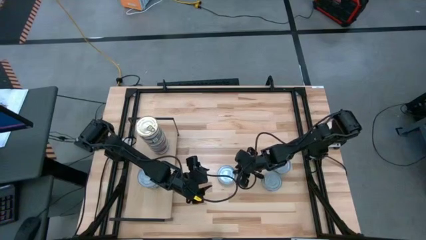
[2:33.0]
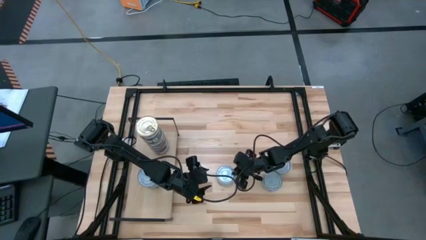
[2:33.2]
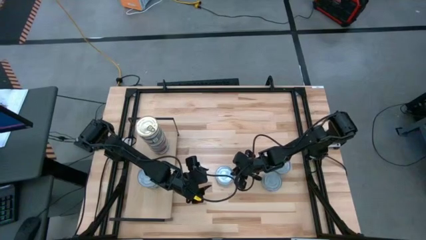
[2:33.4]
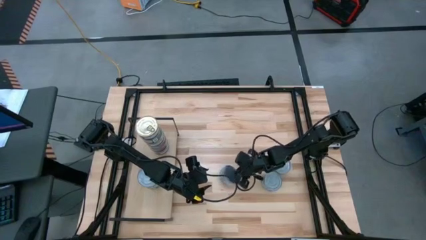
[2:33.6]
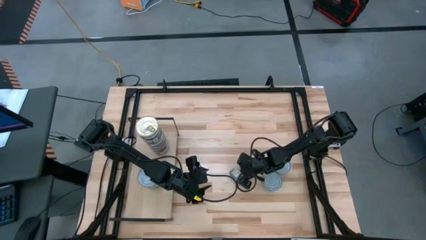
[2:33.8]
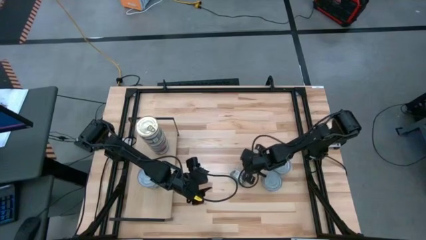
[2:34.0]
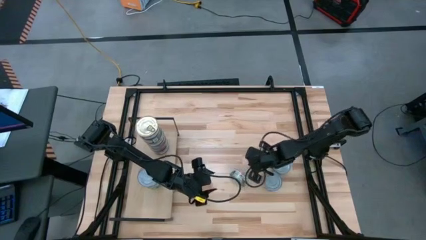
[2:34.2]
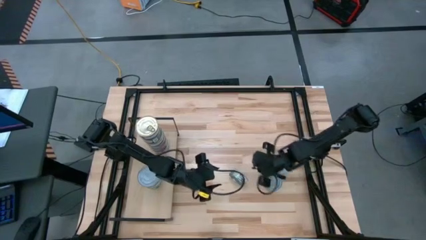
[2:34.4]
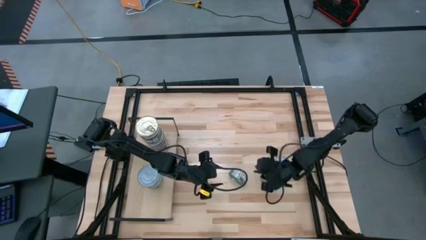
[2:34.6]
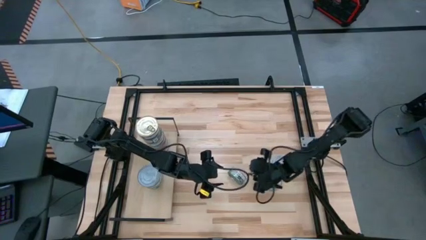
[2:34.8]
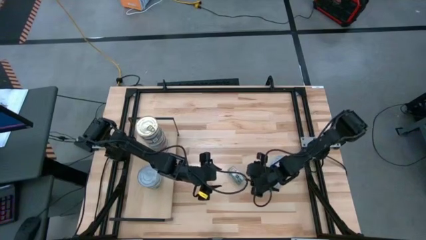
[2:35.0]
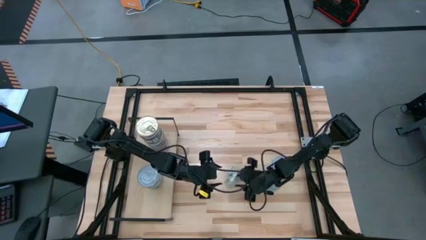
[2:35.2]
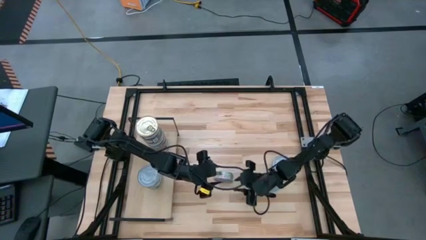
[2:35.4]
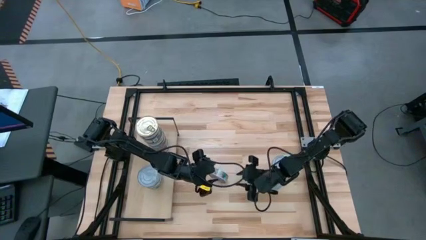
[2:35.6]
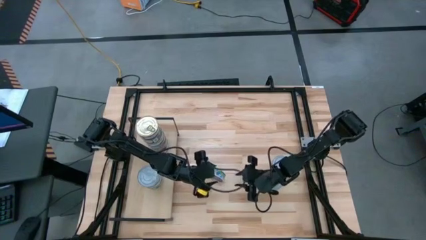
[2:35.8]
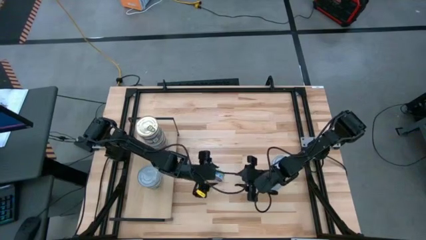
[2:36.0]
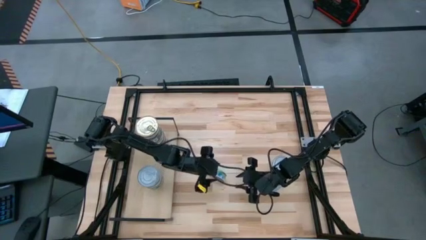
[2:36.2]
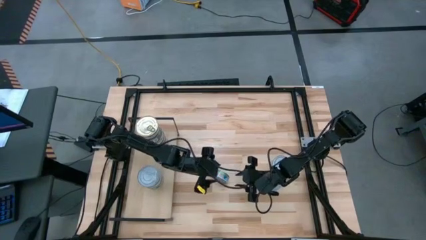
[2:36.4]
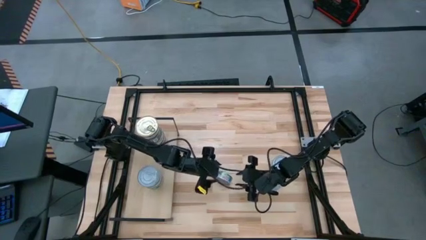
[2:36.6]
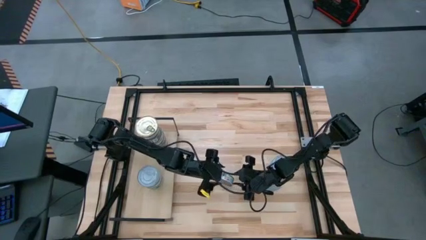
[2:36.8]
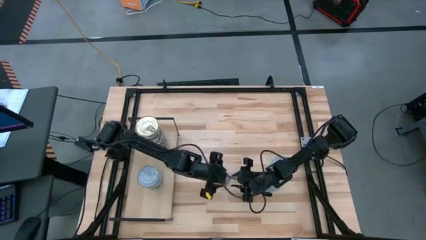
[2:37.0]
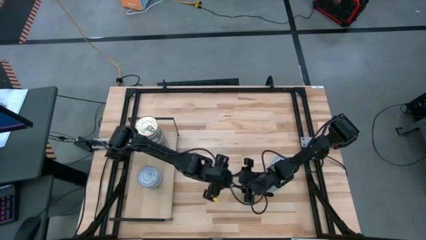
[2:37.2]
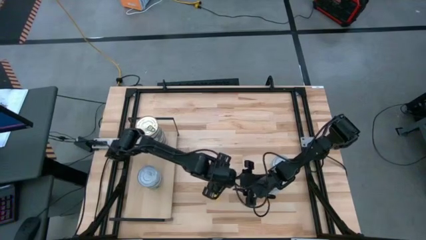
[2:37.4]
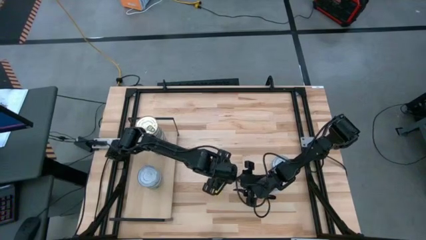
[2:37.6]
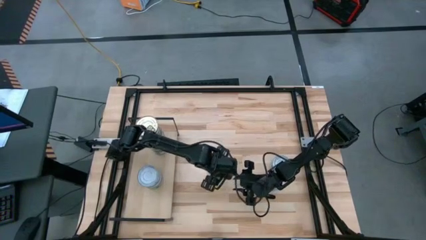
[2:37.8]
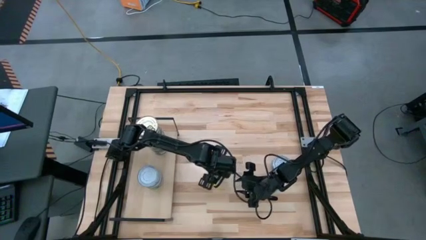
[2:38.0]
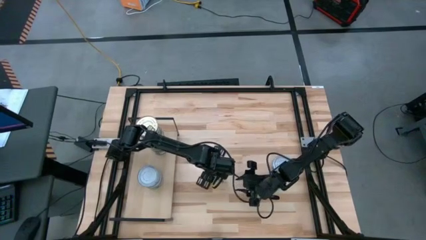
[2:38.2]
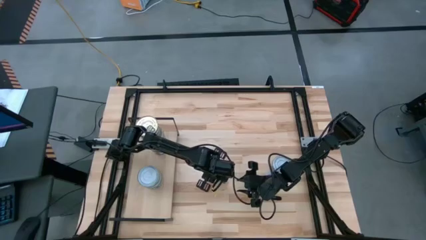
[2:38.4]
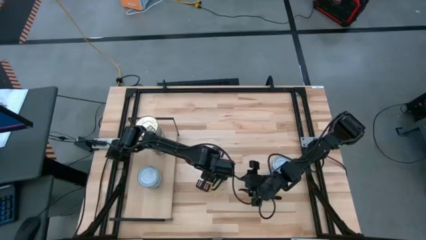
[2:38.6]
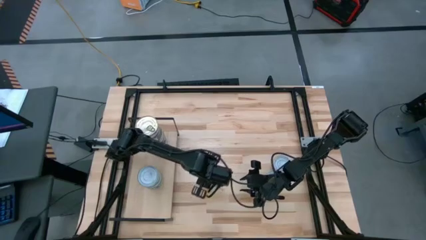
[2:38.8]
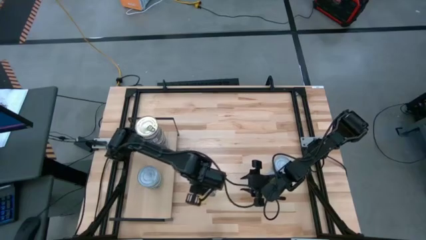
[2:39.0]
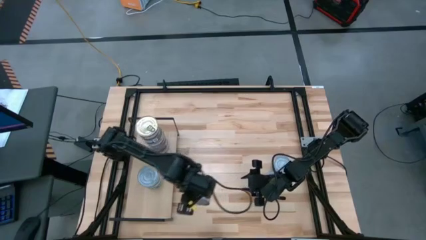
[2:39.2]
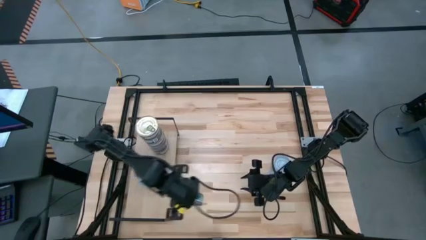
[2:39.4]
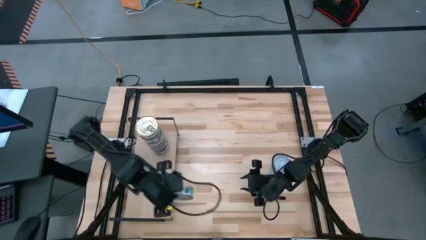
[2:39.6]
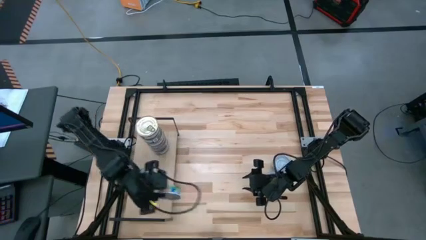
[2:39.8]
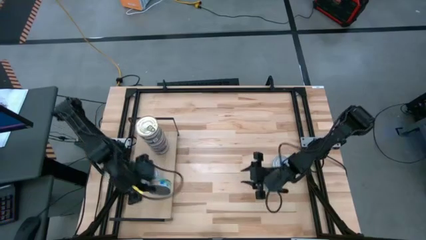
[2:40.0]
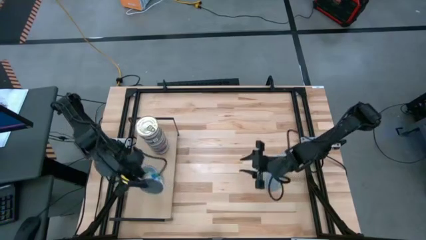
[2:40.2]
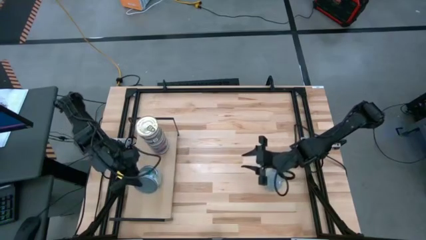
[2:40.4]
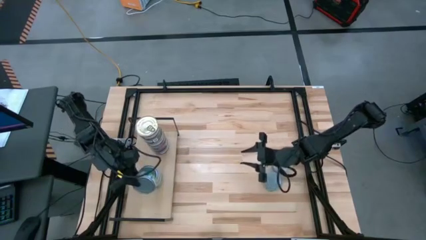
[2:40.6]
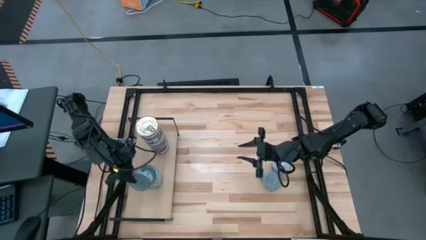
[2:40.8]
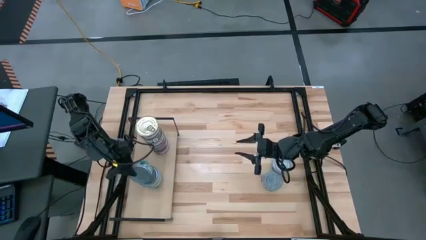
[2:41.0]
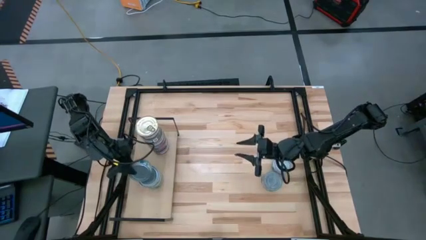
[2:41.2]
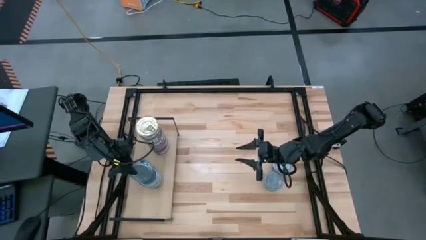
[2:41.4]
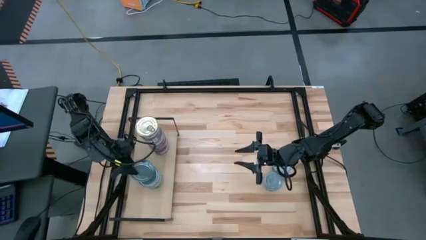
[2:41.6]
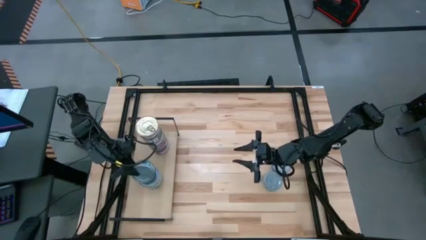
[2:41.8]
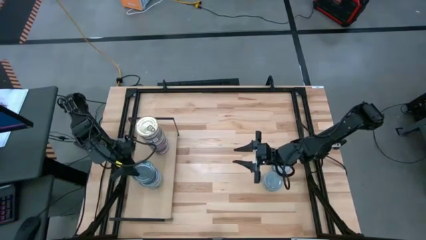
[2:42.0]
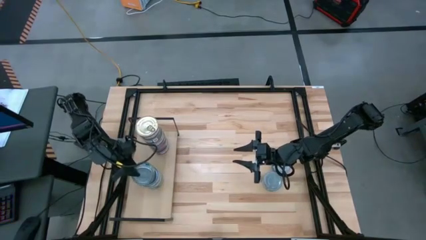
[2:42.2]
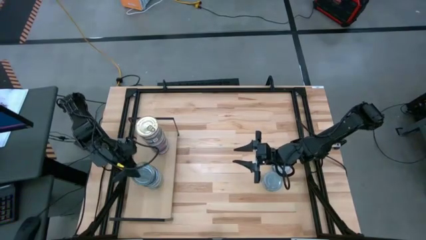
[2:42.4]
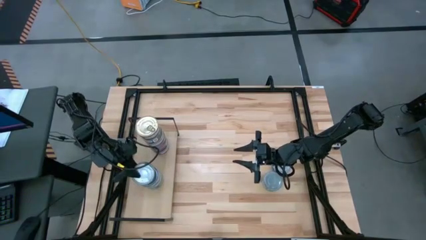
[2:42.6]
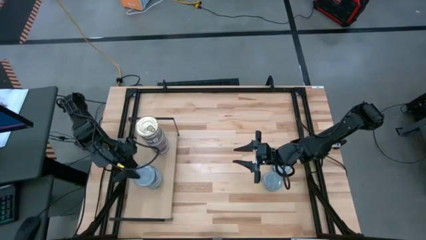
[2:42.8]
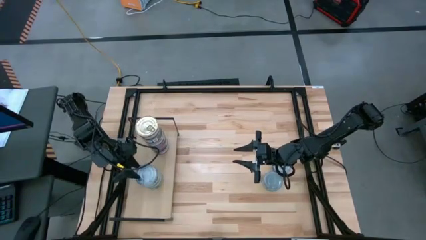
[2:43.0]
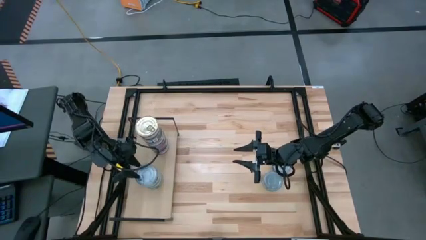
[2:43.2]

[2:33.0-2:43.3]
Task: Stack canned seafood by type on shelf
Stack the top green and white tuna can on the green and white tuna can on the shelf

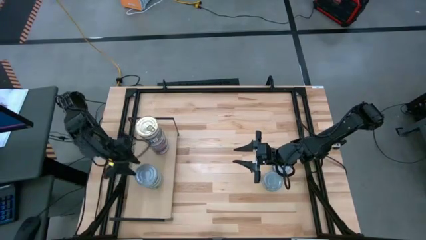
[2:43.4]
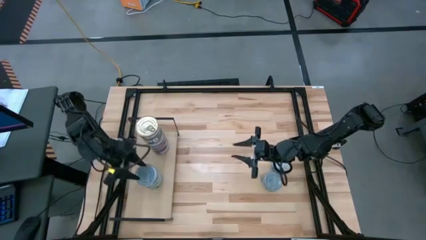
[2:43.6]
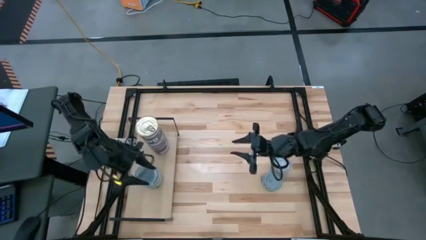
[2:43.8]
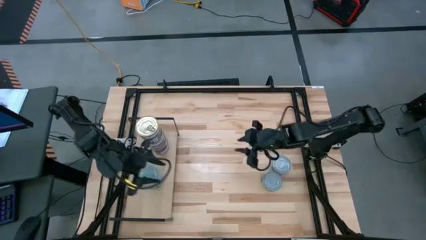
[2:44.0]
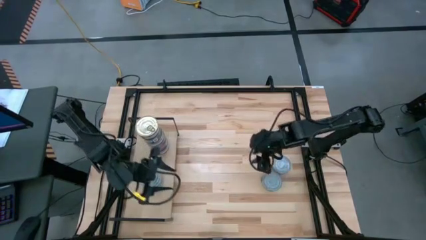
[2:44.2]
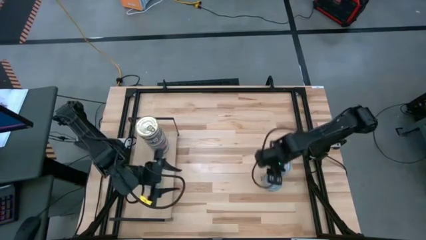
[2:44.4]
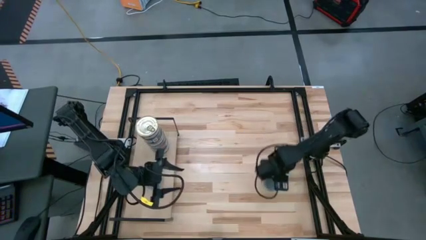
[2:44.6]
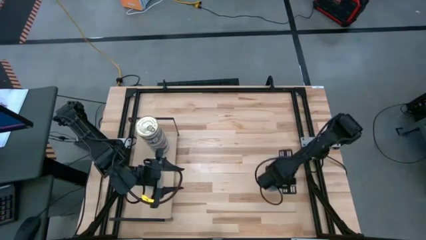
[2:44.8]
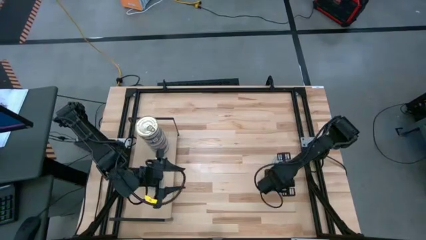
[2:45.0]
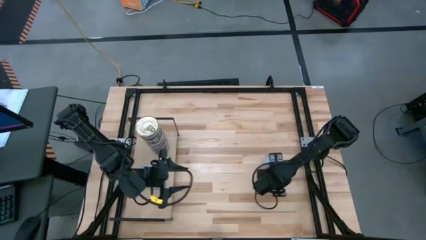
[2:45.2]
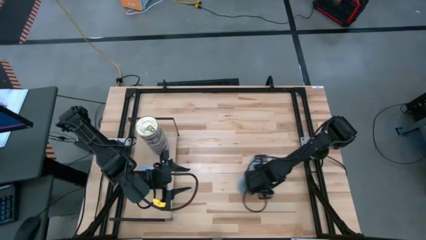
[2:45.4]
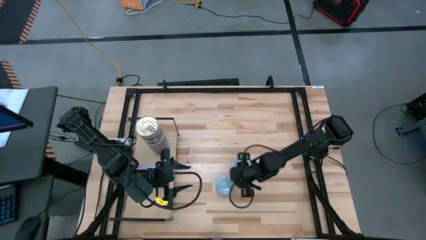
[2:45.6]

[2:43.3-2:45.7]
Adjust the green and white tuna cans on the table

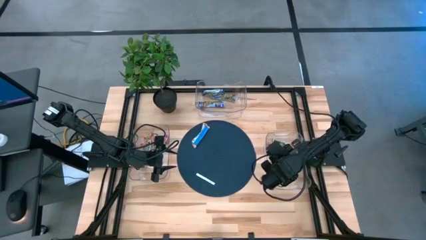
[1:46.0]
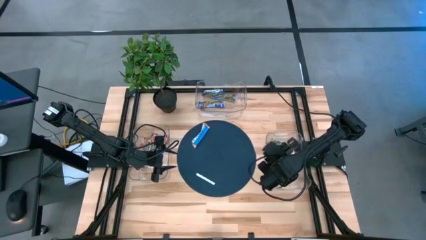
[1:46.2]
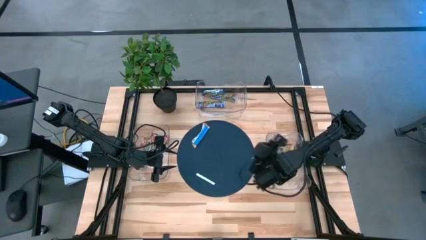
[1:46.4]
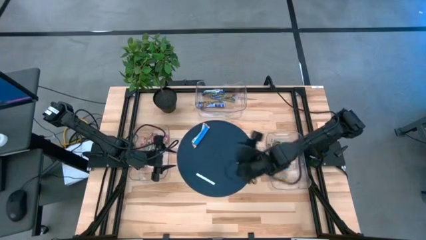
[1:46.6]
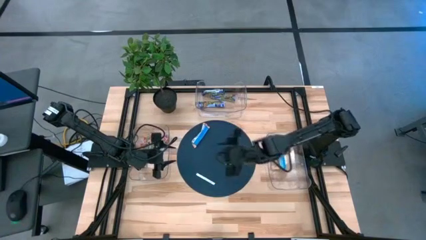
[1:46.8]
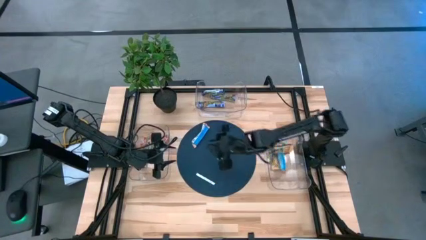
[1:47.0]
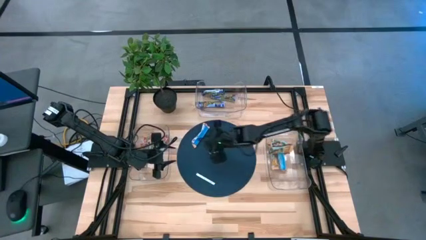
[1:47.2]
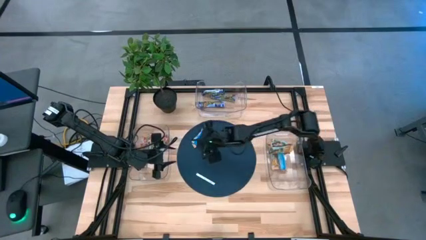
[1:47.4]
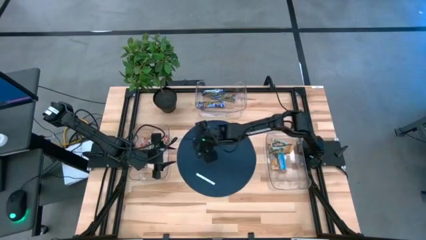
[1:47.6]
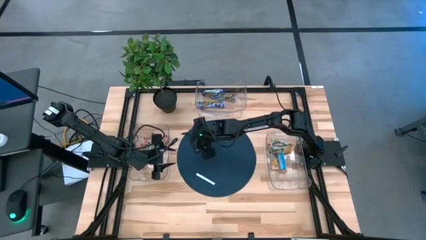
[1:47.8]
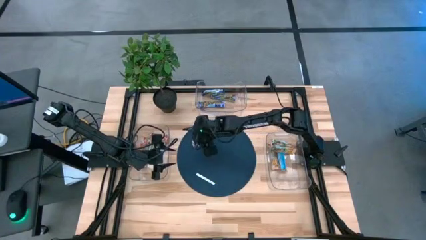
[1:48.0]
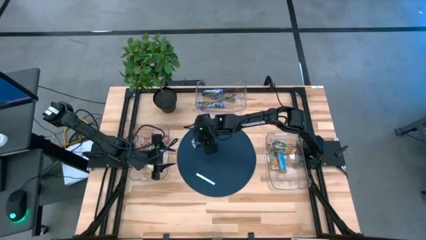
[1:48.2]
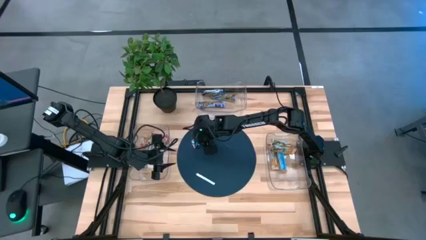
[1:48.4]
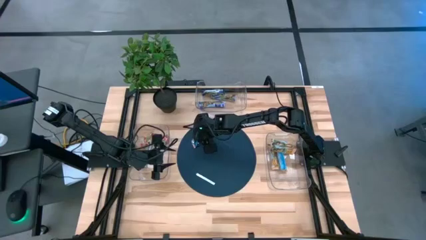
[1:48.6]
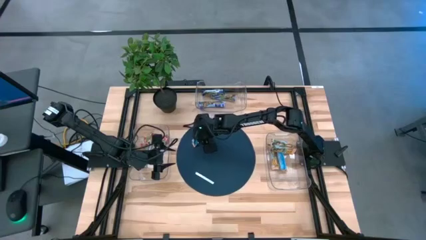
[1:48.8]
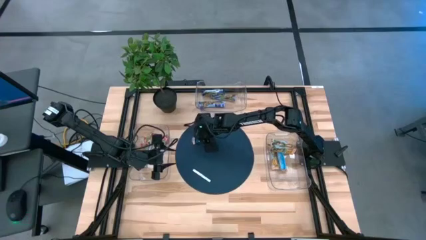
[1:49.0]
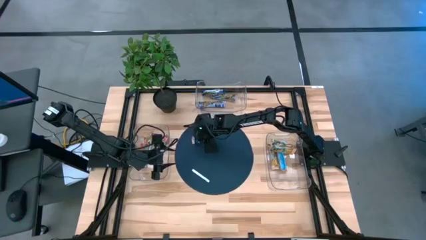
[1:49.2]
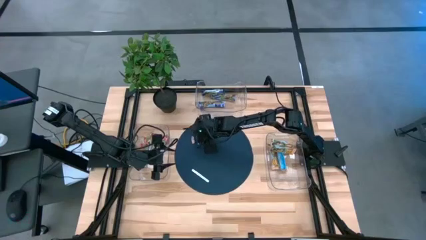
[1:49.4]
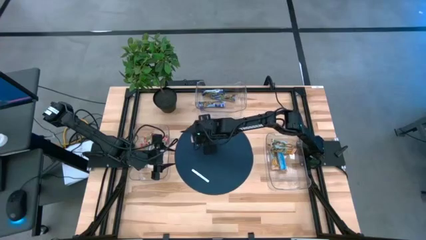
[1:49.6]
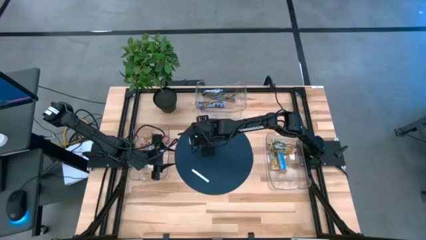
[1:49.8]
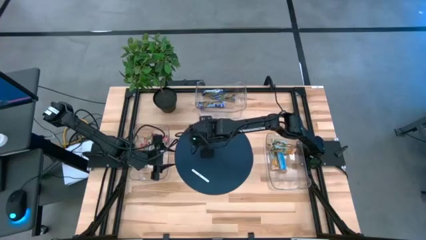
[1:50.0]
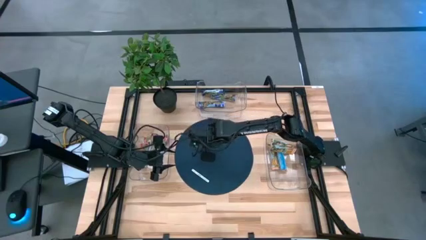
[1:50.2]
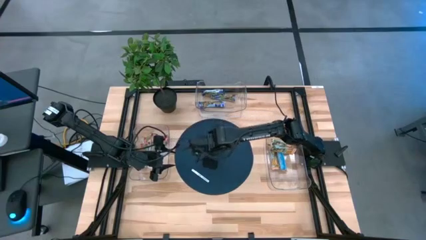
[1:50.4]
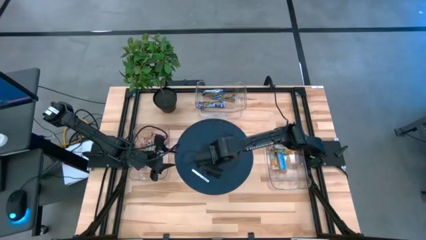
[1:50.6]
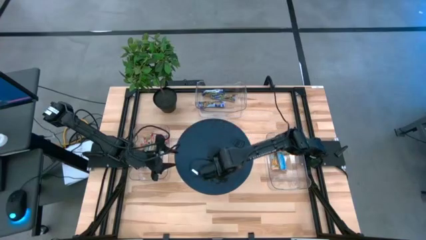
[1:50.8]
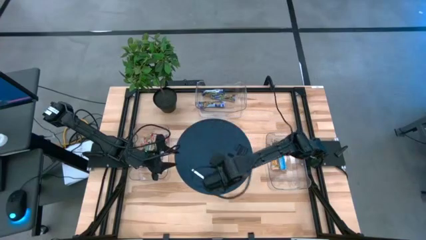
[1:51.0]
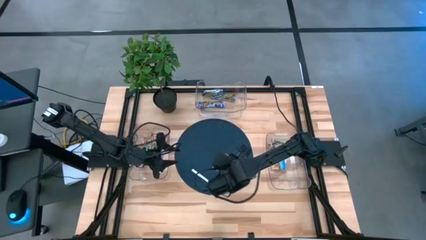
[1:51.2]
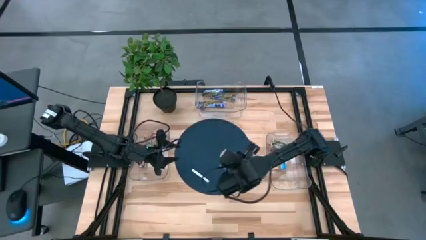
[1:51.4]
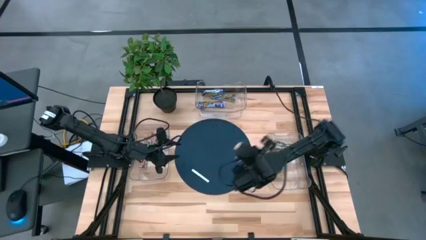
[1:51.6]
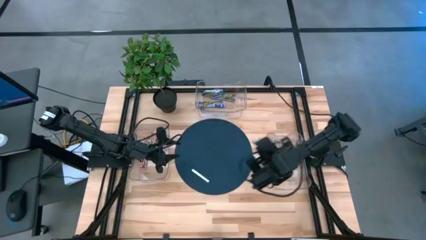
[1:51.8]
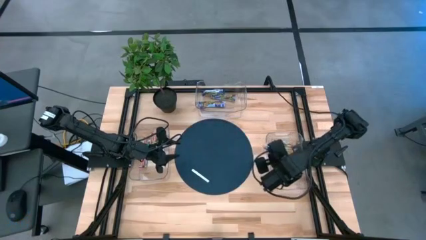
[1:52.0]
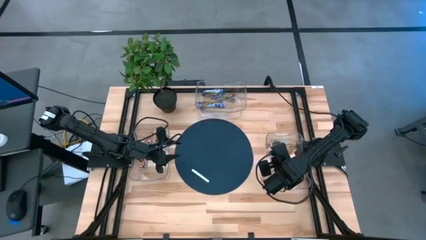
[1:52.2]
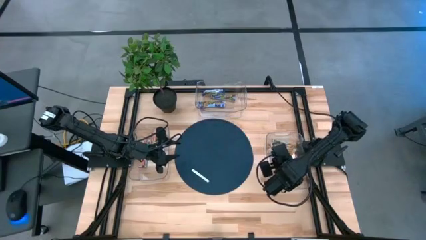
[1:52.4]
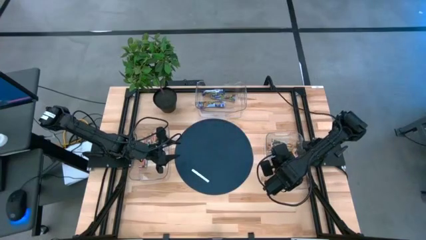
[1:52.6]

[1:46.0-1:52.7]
Task: Pick and place Granola Bars by type
Put the orange granola bar into the right transparent bin
